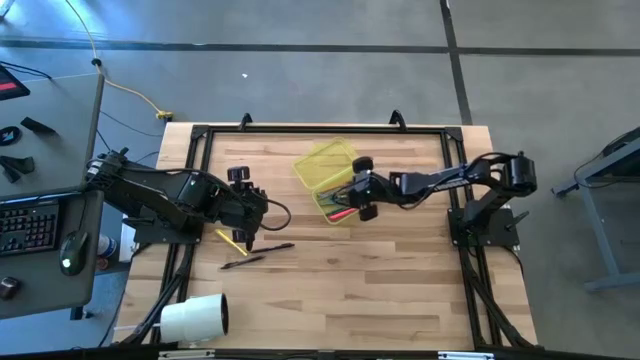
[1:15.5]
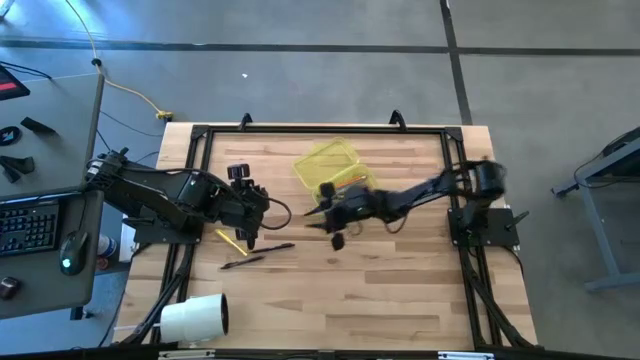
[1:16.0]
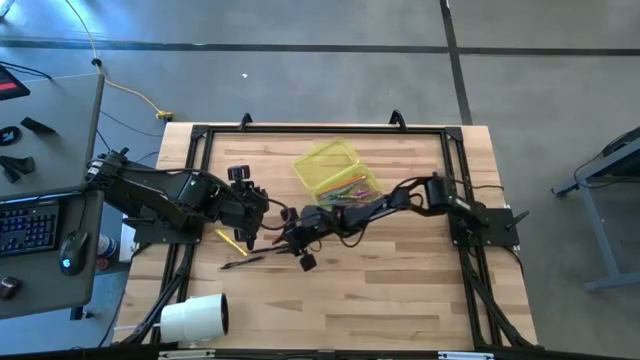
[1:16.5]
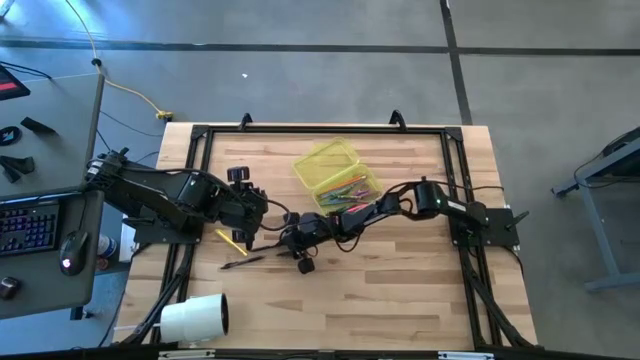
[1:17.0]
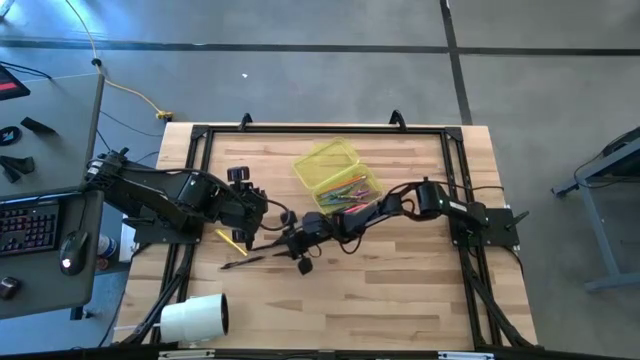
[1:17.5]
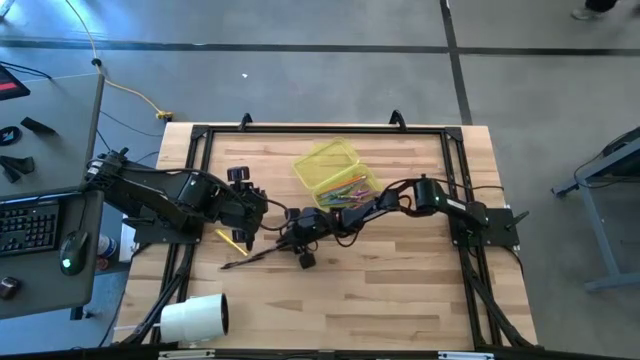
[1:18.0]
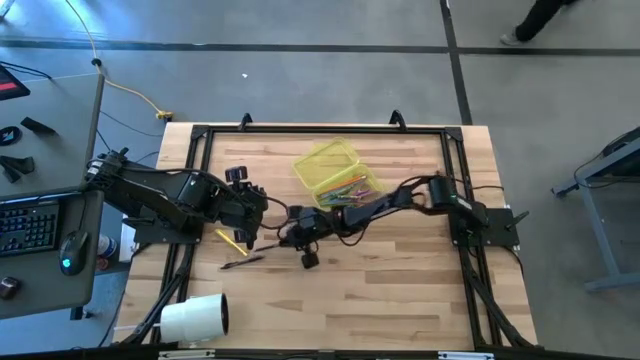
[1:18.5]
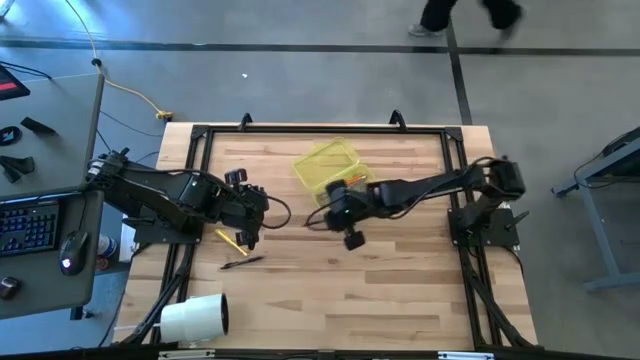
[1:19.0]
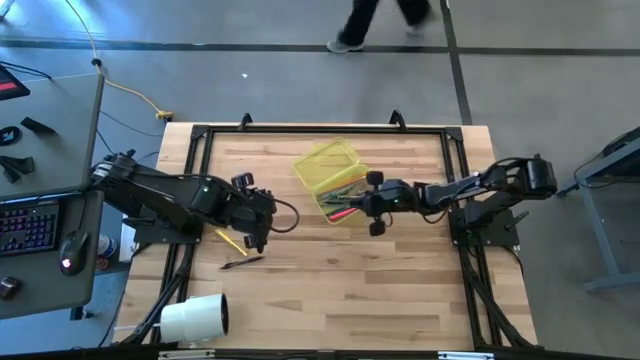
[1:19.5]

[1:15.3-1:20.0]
Task: Pick & place school supplies into a supply box
Put the top black ballpoint pen into the supply box

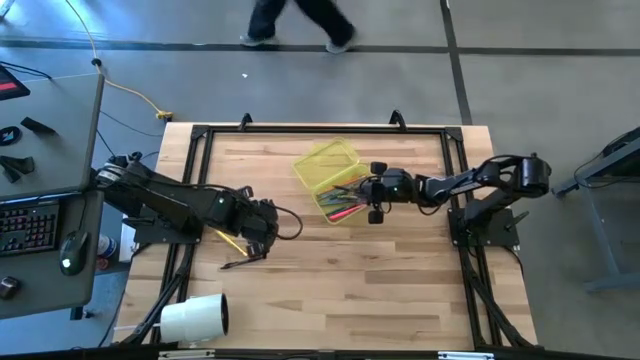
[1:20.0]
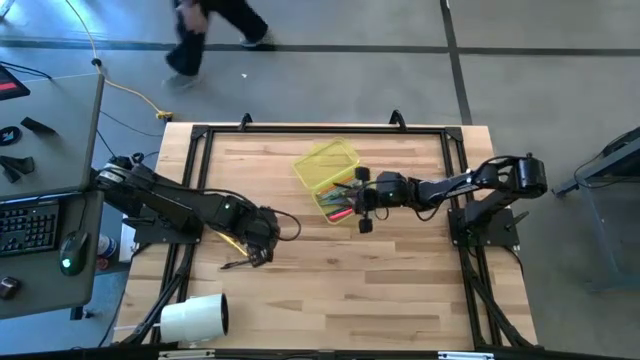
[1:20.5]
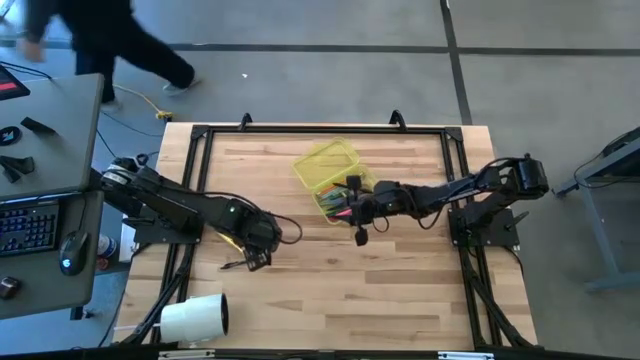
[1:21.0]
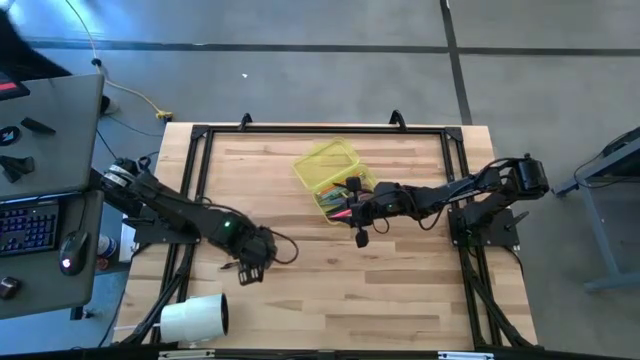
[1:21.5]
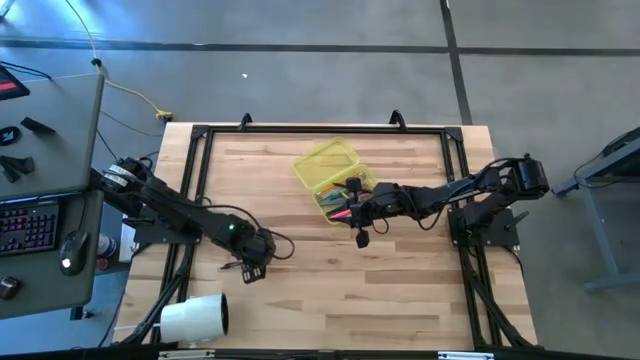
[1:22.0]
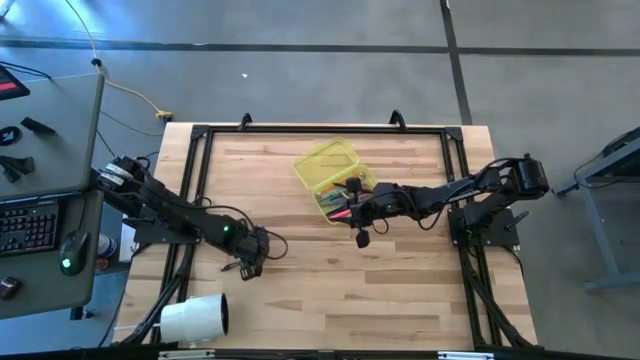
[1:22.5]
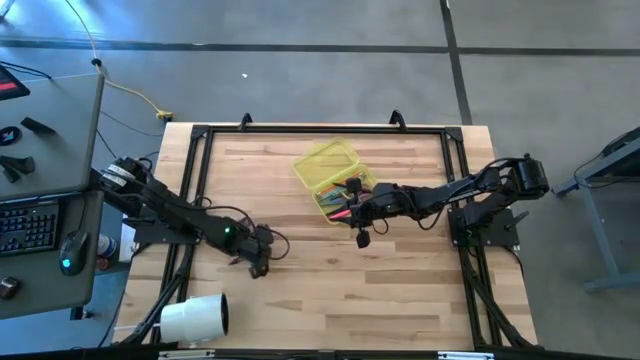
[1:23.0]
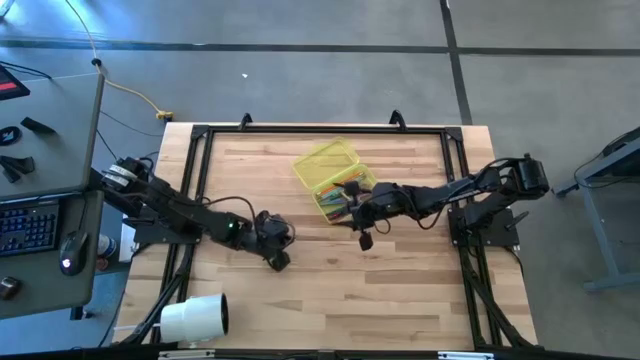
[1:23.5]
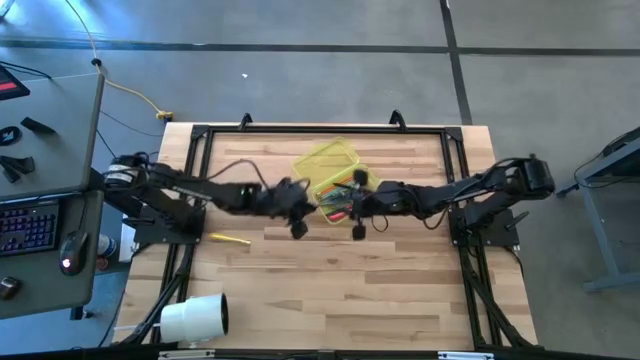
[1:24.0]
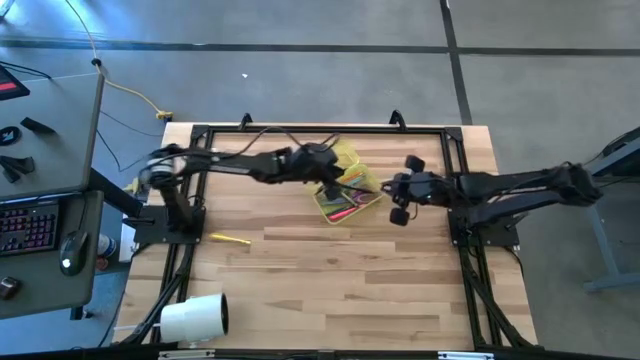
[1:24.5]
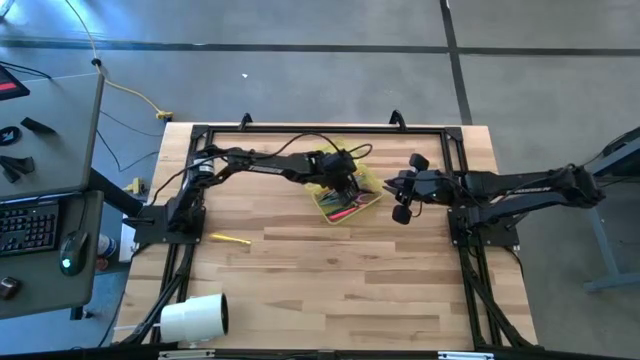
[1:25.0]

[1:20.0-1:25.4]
Put the black ballpoint pen into the supply box

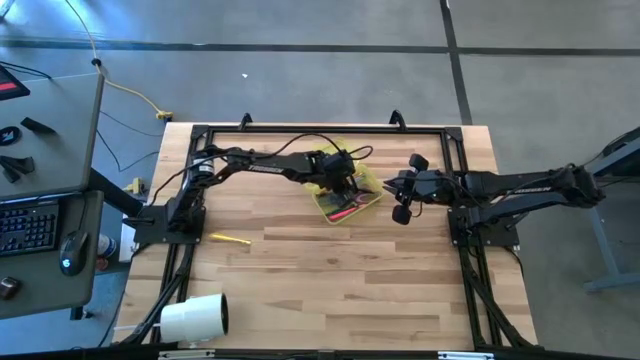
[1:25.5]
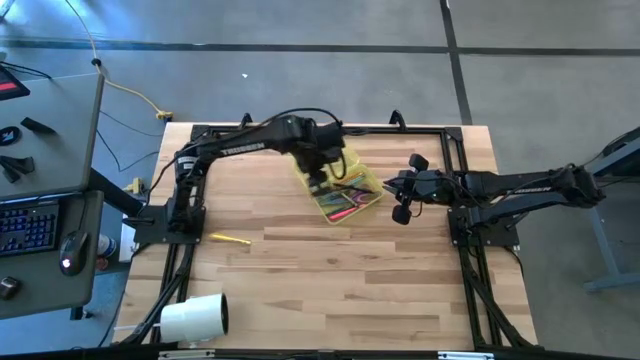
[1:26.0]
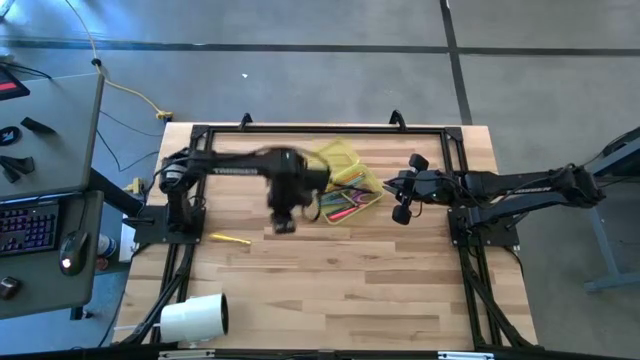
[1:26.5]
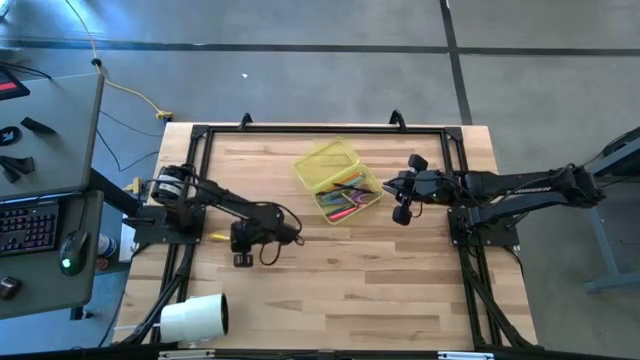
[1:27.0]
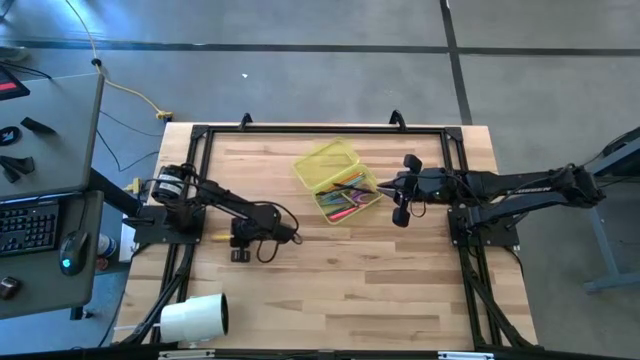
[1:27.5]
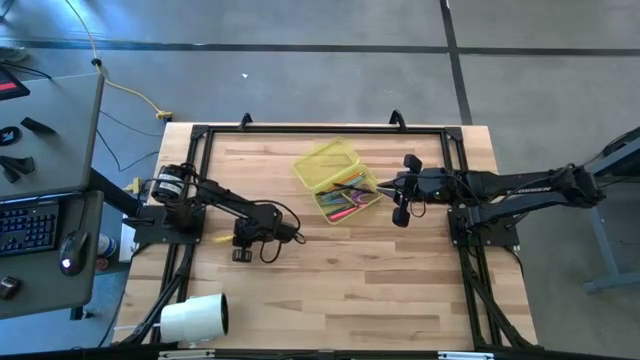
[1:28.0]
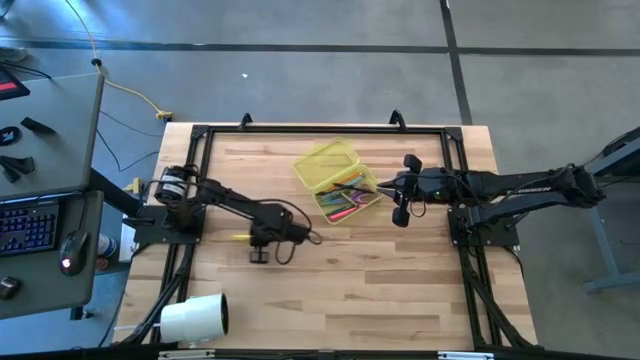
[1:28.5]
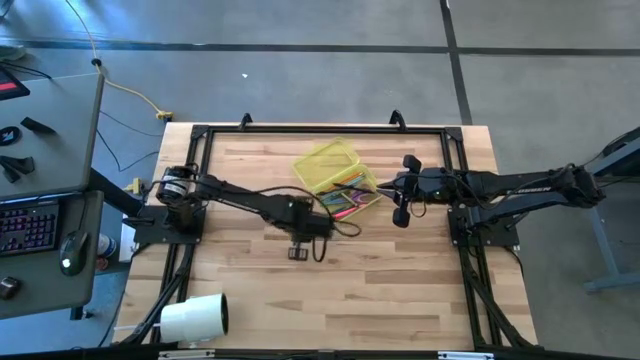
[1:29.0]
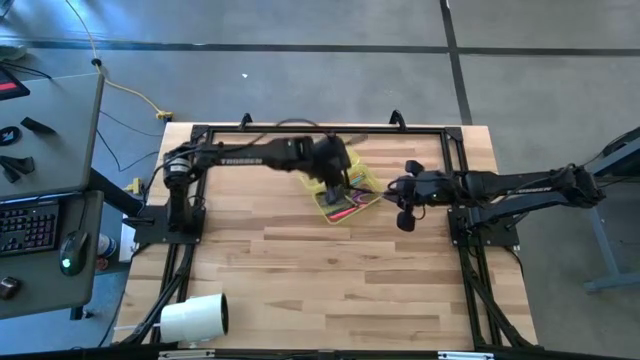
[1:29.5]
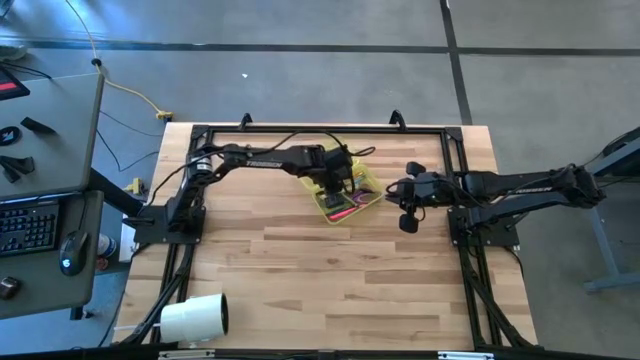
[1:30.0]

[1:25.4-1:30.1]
Put the yellow ballpoint pen into the supply box

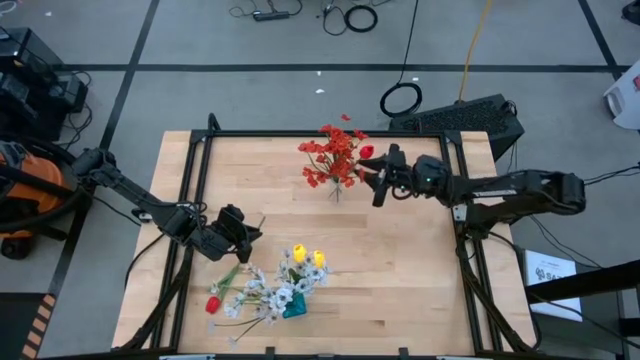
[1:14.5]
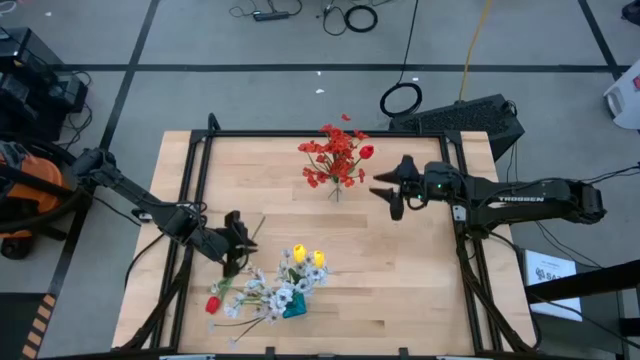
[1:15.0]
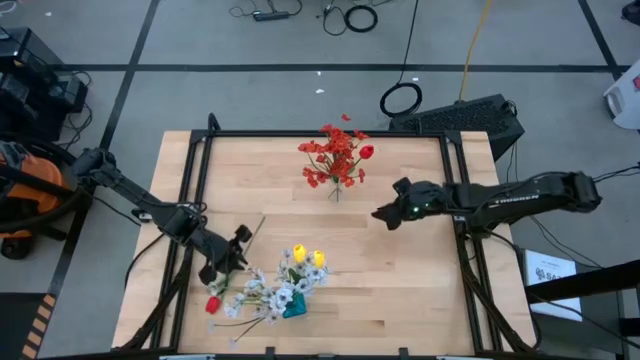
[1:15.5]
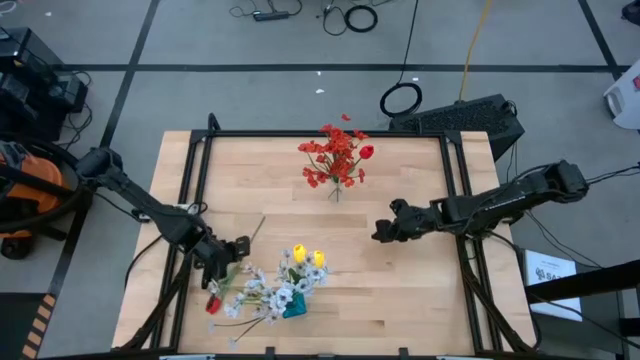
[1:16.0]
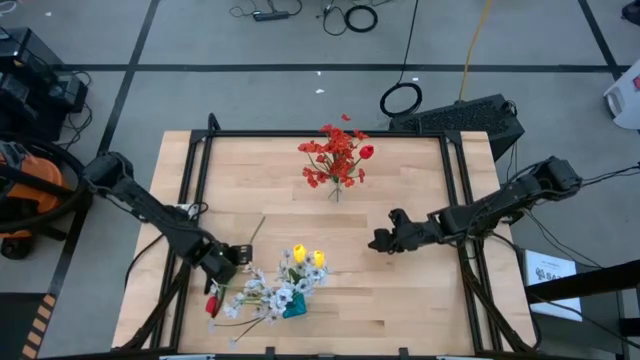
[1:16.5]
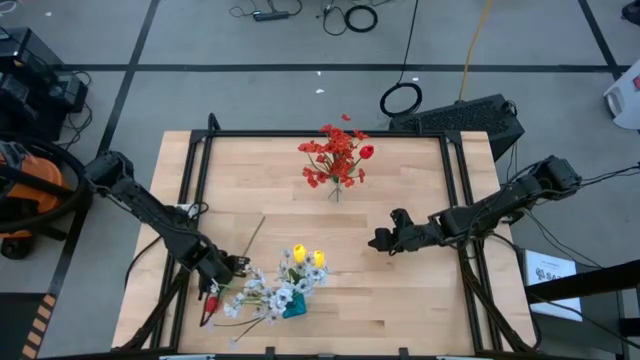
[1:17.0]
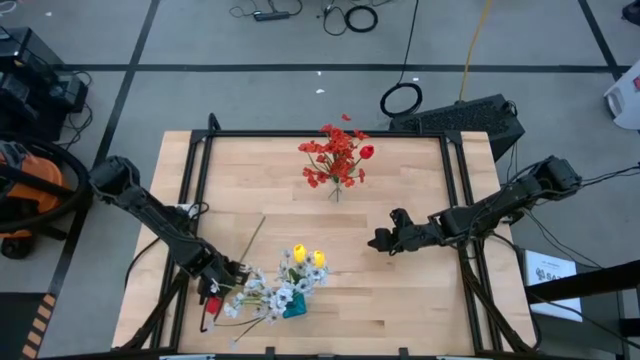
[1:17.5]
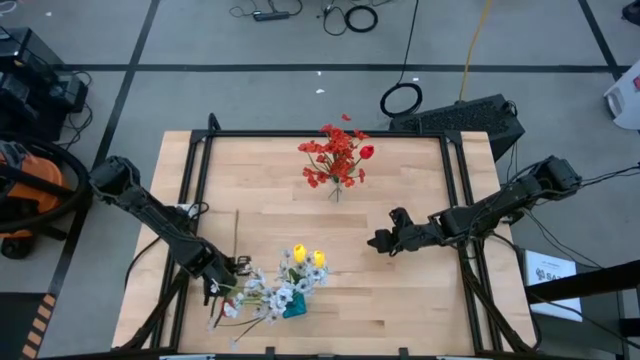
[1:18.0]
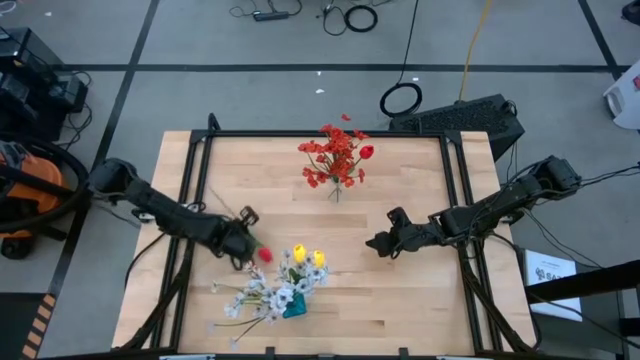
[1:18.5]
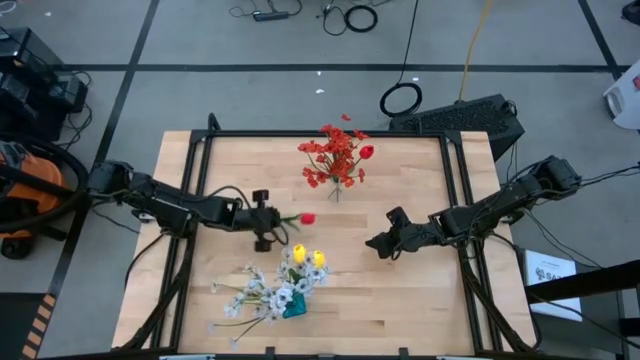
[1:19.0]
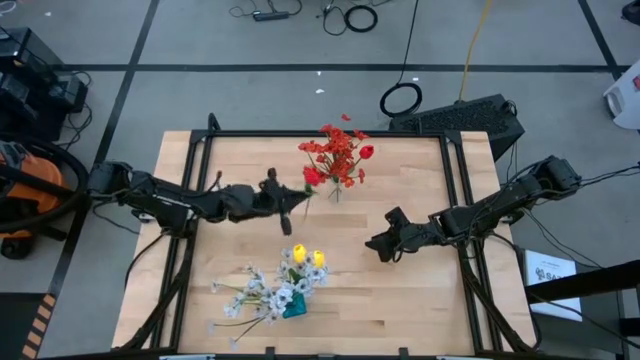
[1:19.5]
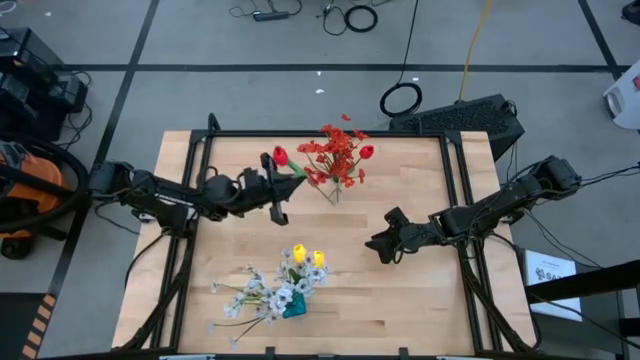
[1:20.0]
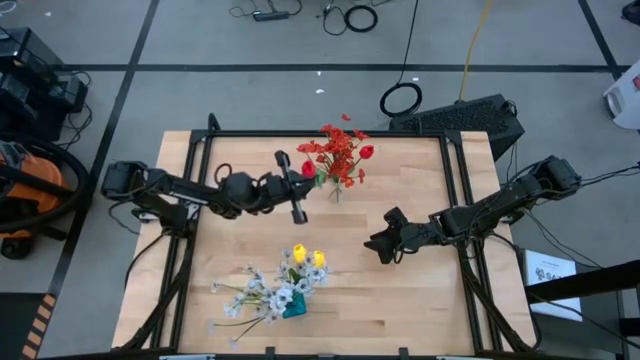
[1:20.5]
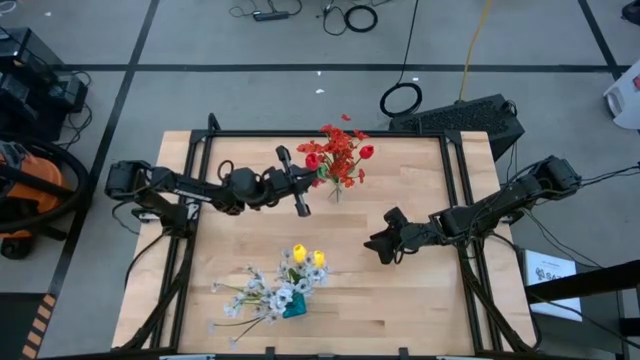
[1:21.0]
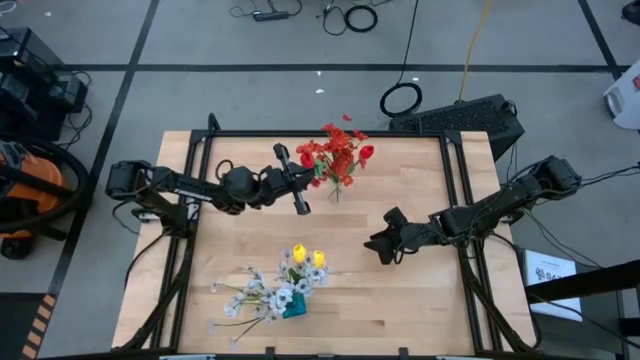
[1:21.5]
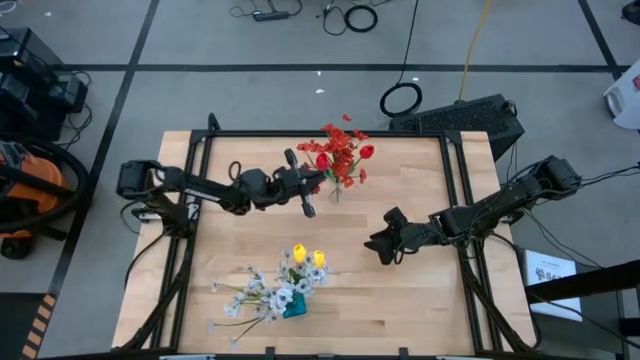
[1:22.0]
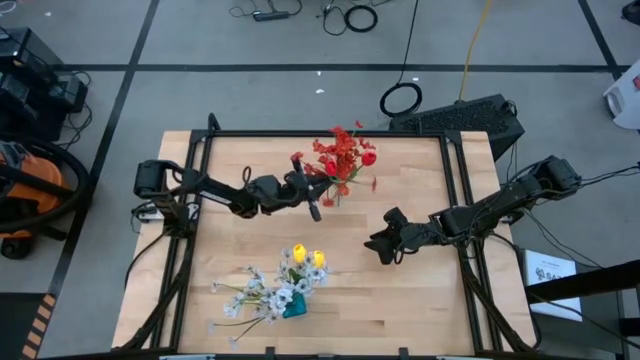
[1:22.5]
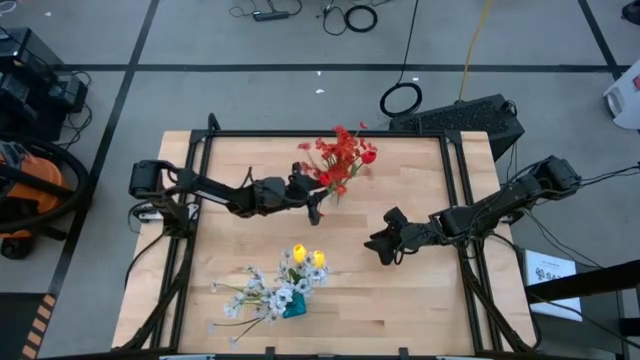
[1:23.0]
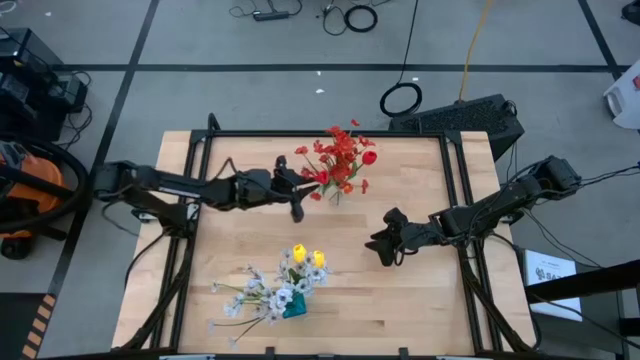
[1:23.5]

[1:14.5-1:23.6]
Task: Sort flowers into vase by color
Put the red tulip into the transparent flower vase
